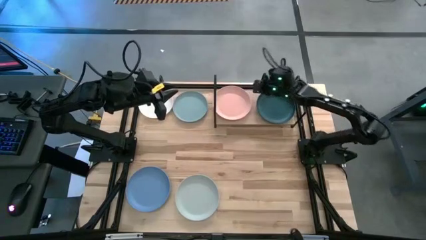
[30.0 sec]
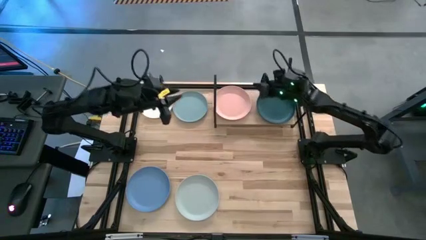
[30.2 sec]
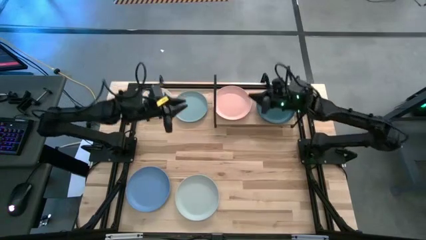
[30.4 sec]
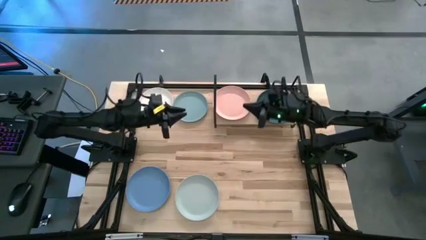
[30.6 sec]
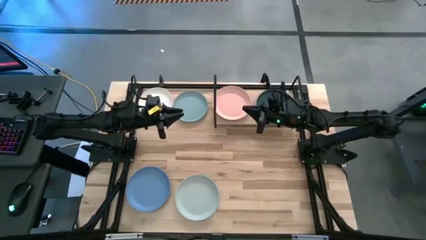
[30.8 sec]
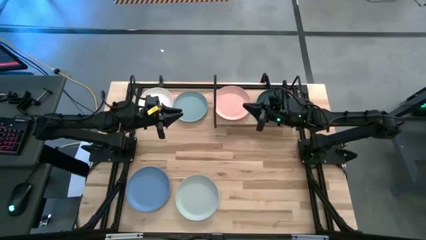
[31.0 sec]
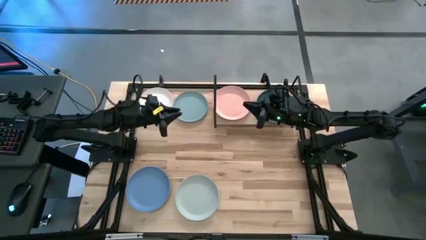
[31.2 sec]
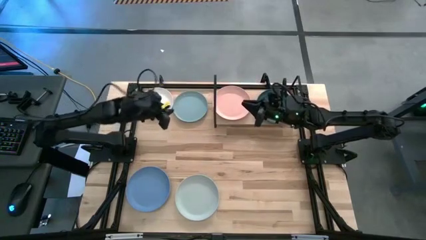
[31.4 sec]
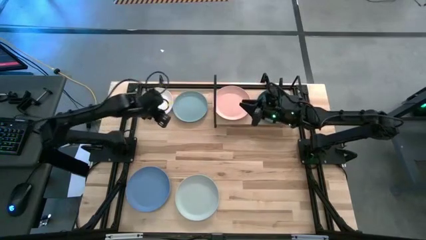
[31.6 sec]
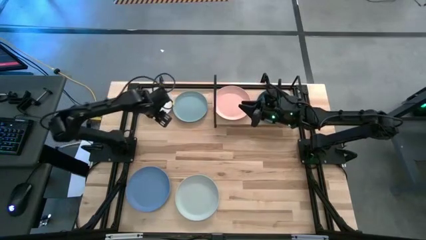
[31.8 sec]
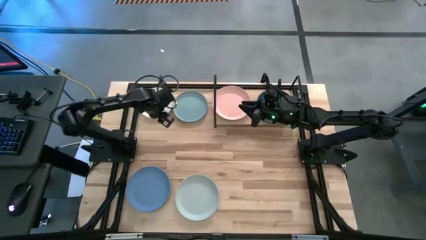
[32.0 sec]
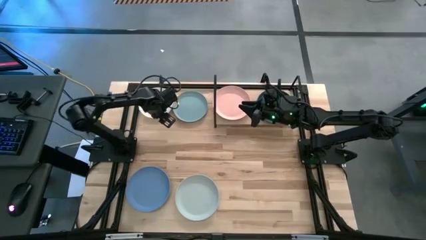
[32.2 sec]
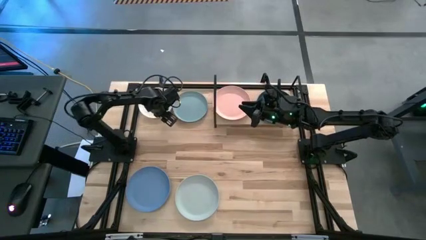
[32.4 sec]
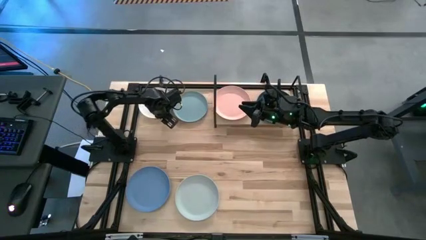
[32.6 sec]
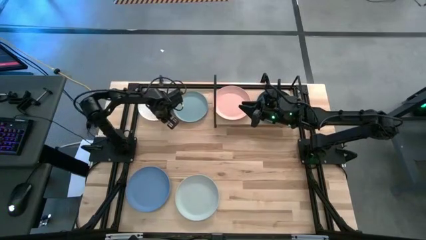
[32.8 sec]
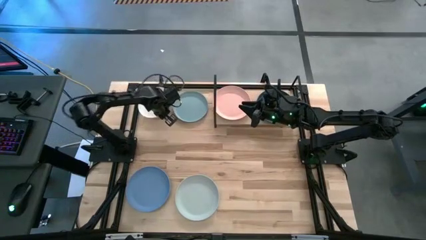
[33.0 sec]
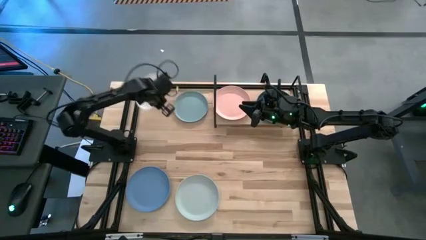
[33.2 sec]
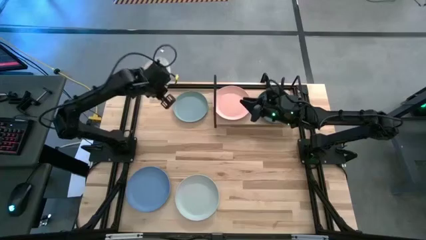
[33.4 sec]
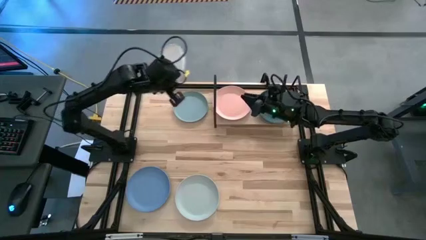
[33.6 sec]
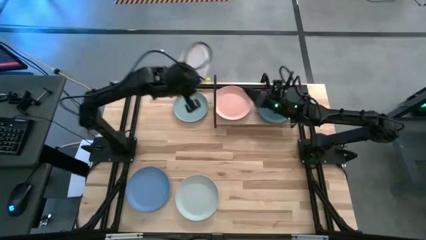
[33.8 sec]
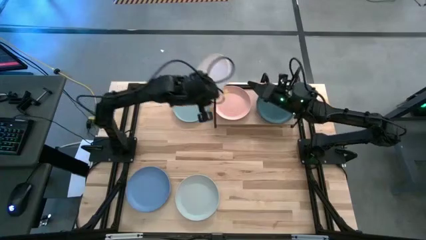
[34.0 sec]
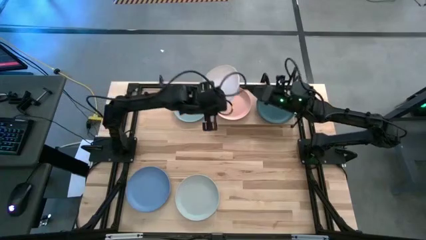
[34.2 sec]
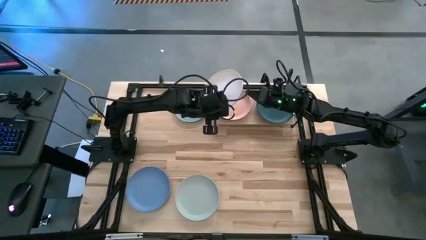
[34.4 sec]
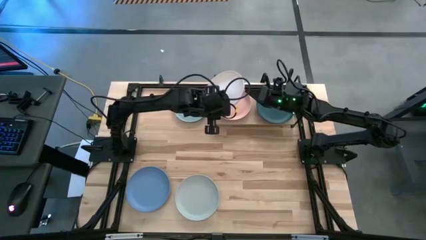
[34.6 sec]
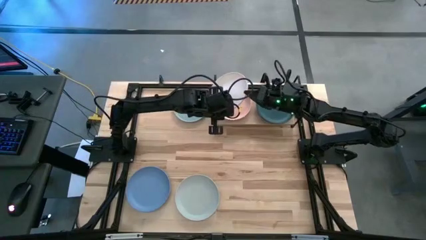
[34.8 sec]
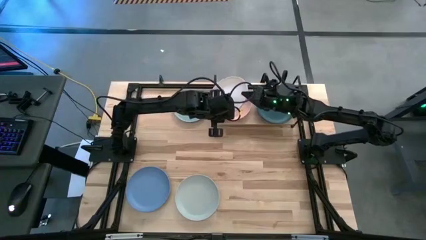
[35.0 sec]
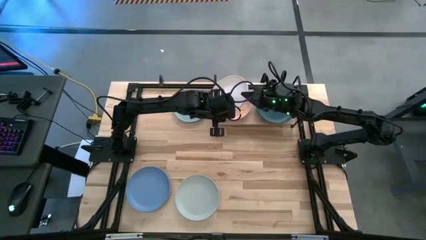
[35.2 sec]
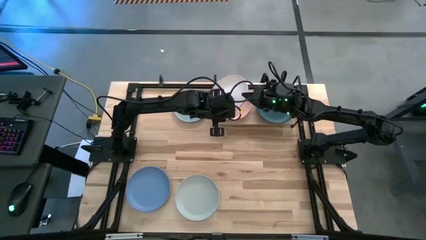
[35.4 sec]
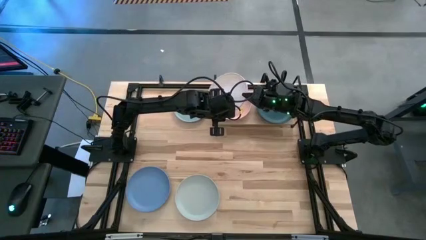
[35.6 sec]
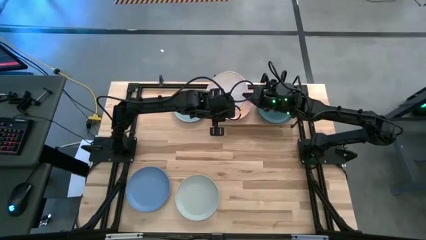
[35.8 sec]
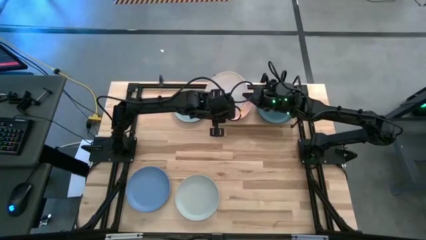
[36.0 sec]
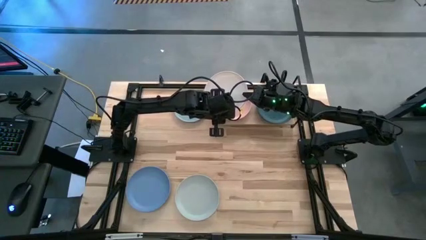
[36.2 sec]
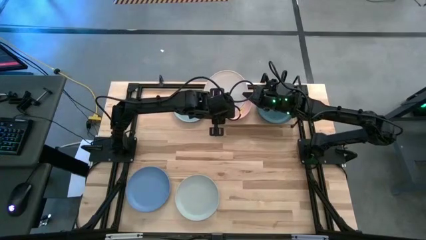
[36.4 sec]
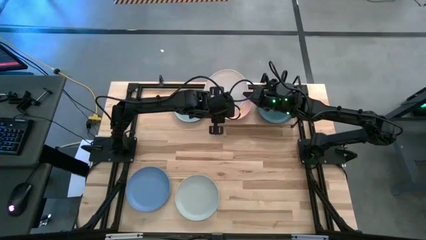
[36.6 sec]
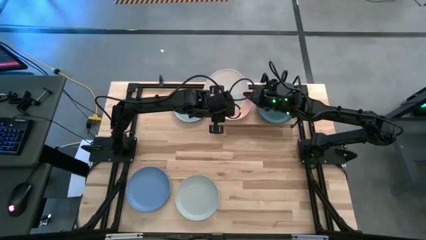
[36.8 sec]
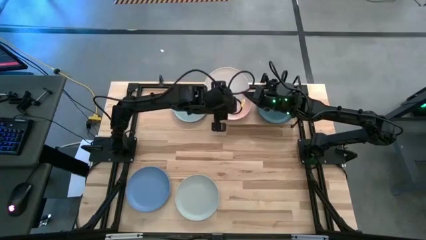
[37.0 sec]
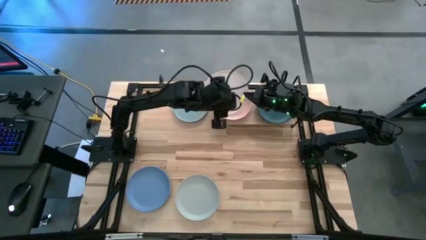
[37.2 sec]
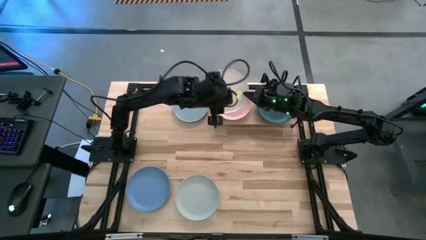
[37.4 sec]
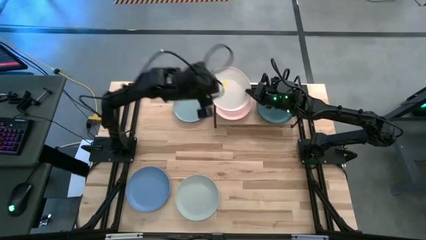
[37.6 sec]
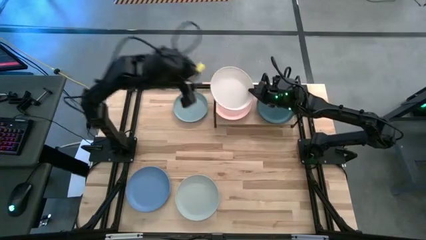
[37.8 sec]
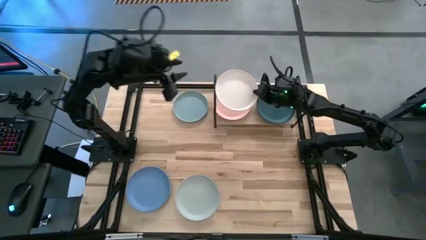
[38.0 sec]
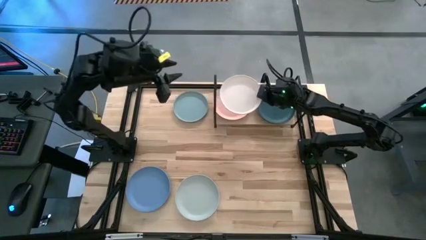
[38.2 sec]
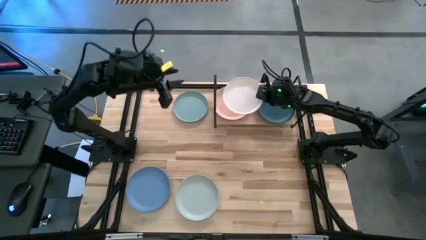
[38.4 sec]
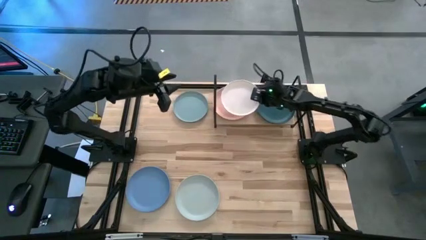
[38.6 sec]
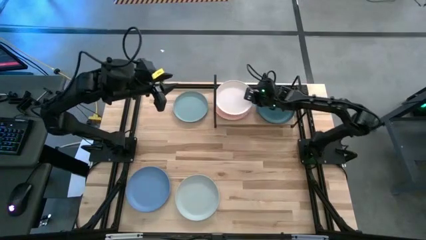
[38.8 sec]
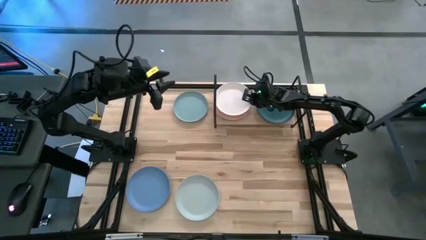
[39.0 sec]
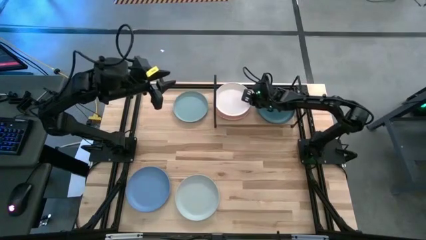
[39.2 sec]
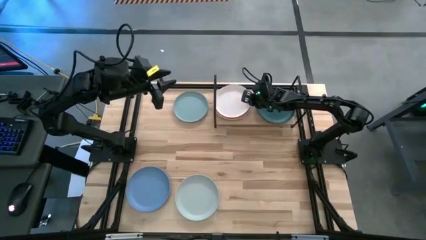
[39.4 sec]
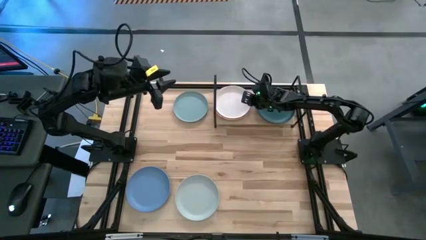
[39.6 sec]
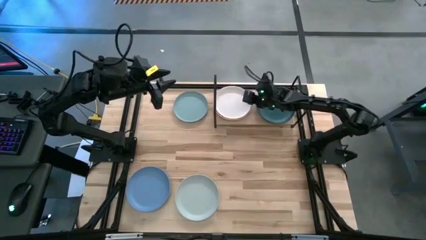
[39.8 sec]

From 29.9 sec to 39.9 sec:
Task: Place and stack plates onto a shelf
Stack the white plate on top of the pink plate on the shelf

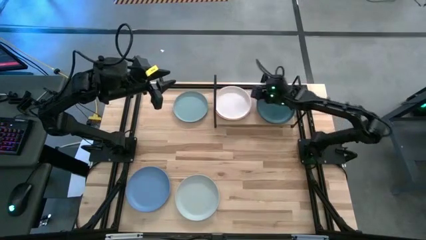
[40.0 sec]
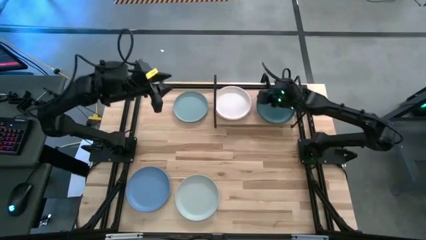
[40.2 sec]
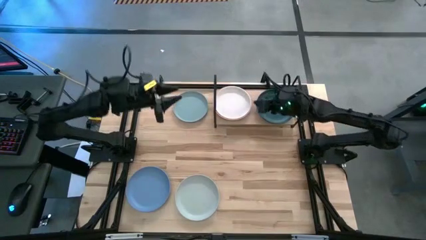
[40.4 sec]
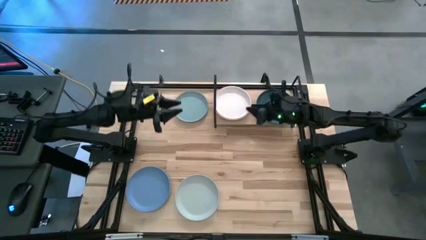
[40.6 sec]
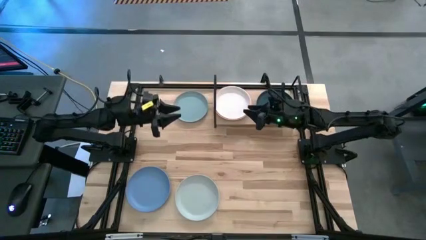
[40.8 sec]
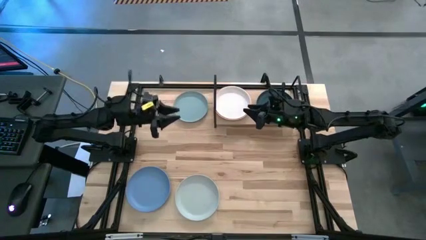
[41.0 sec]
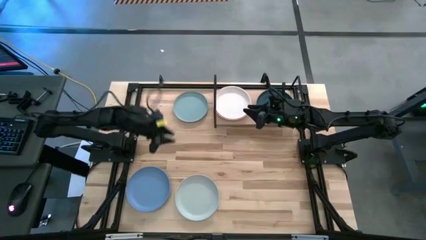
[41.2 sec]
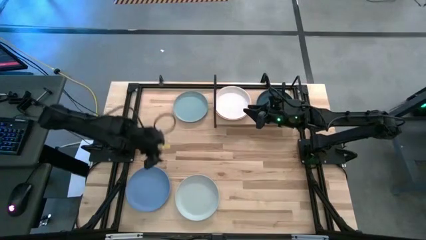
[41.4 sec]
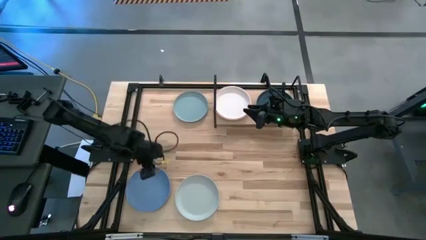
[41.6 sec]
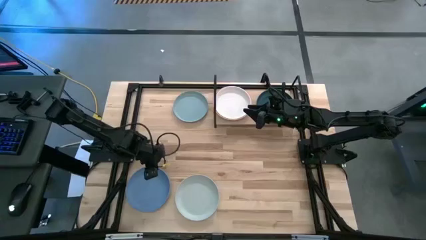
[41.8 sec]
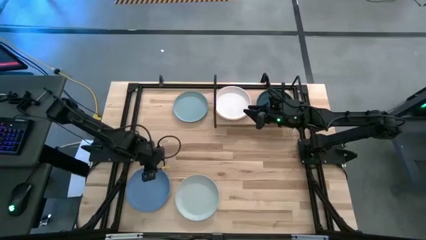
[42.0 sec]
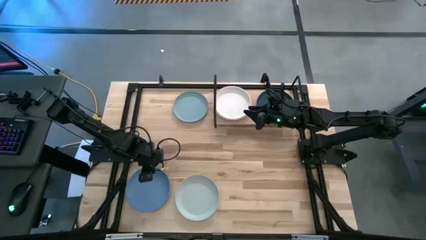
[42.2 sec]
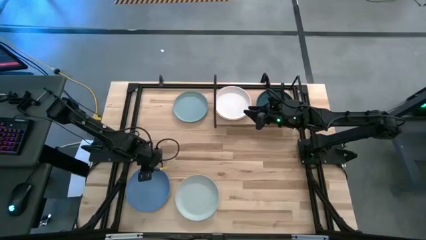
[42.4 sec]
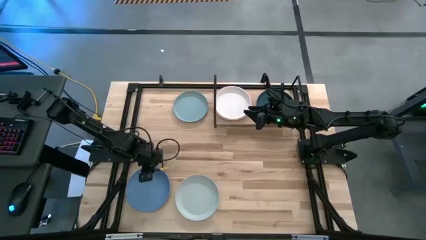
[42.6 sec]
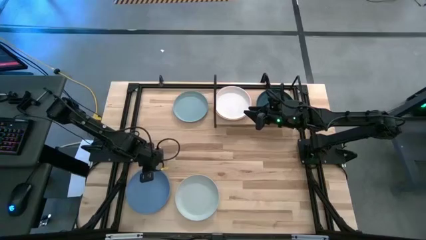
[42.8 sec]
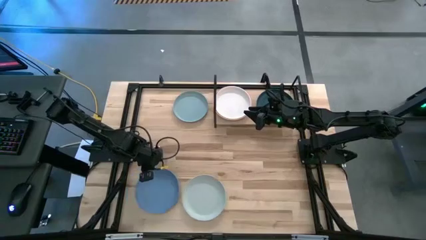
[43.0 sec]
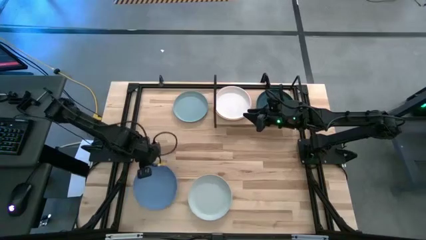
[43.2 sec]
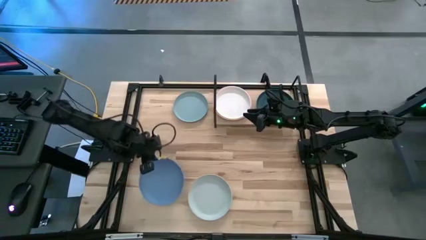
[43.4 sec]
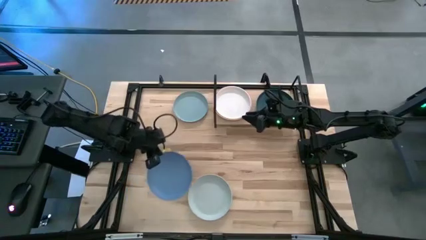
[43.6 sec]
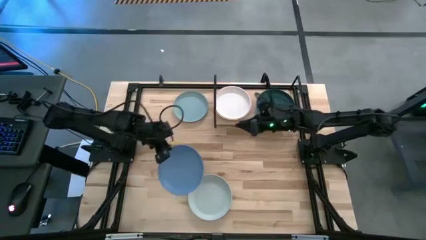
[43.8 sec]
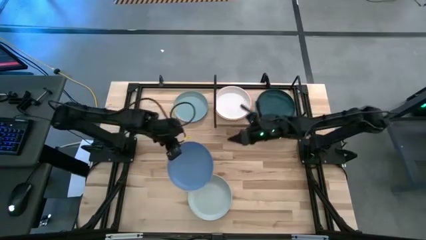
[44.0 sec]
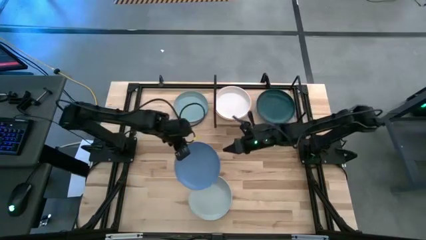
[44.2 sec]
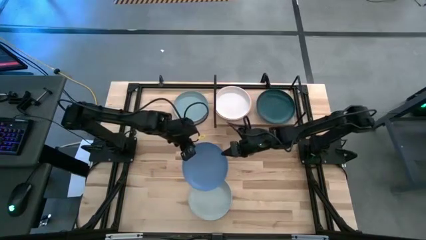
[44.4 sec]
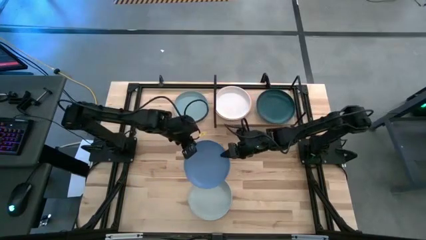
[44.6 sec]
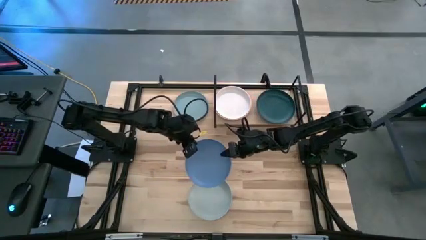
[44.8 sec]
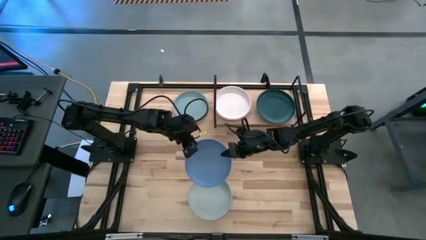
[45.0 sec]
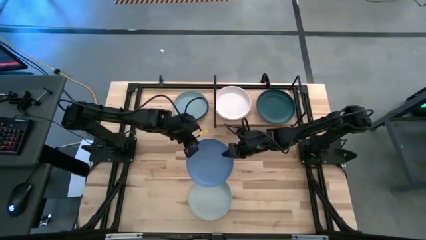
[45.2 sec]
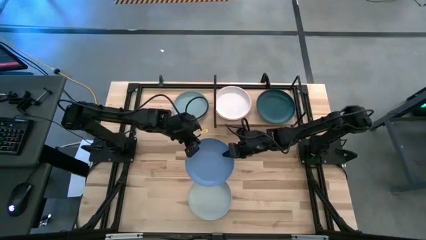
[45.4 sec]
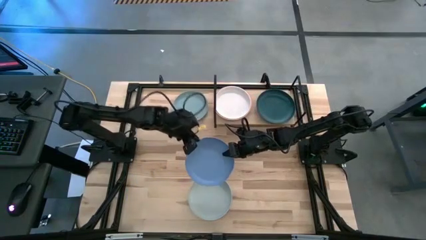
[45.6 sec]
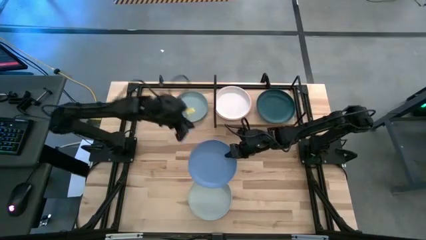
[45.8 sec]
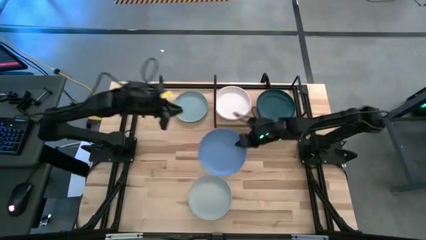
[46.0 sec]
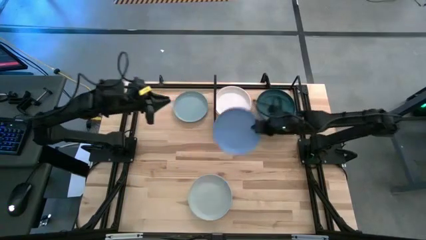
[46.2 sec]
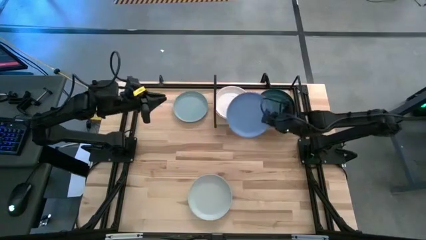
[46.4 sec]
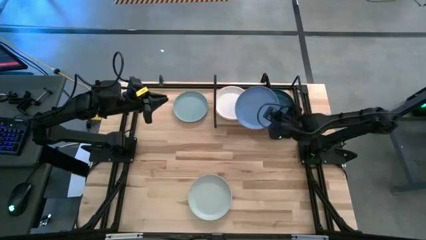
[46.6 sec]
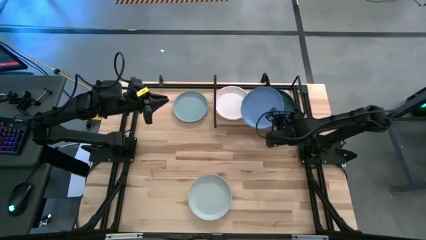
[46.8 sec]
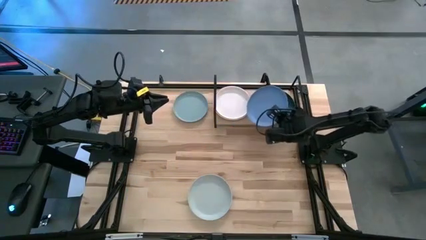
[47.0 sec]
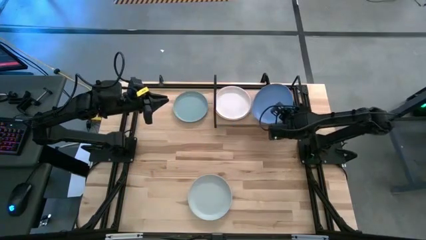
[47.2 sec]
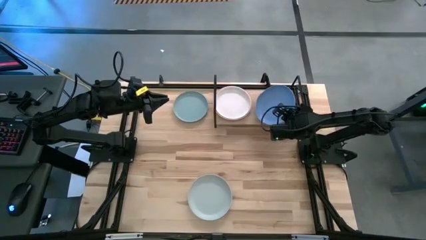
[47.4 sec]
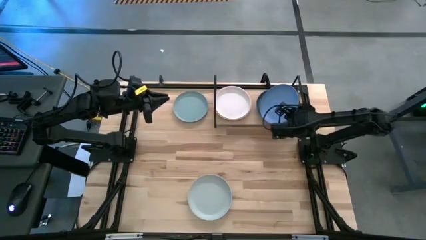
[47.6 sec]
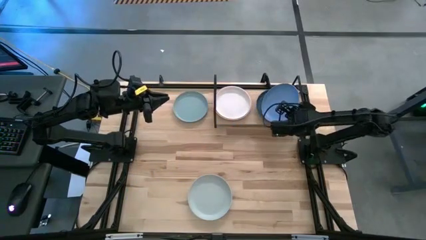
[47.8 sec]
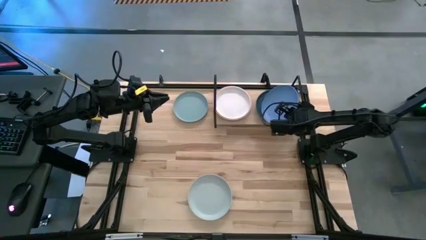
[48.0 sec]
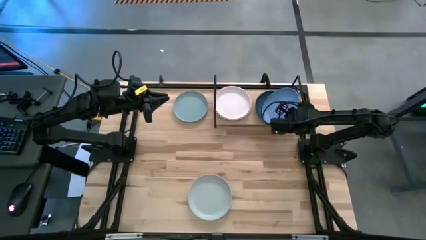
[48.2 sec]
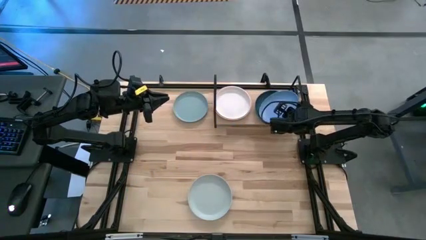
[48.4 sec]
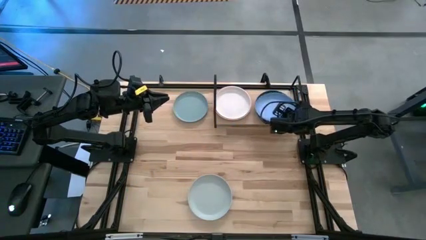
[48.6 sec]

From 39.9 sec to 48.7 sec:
Stack the blue plate on top of the green plate on the shelf
